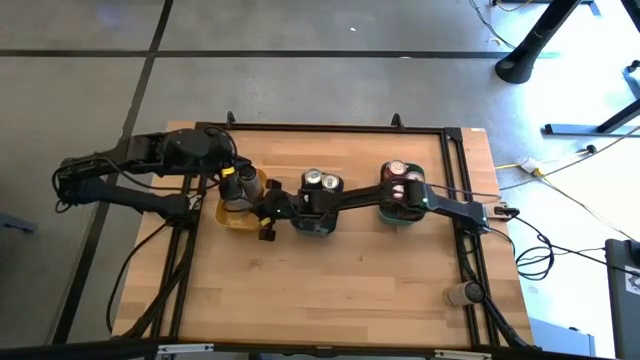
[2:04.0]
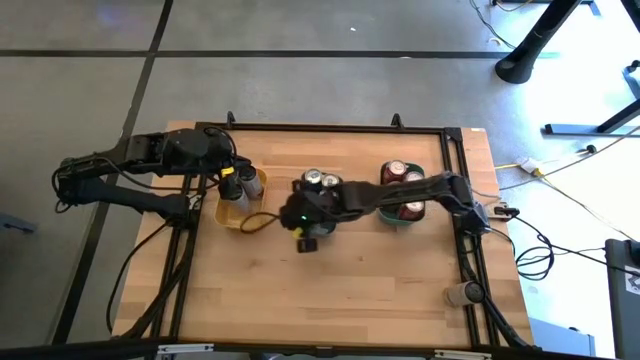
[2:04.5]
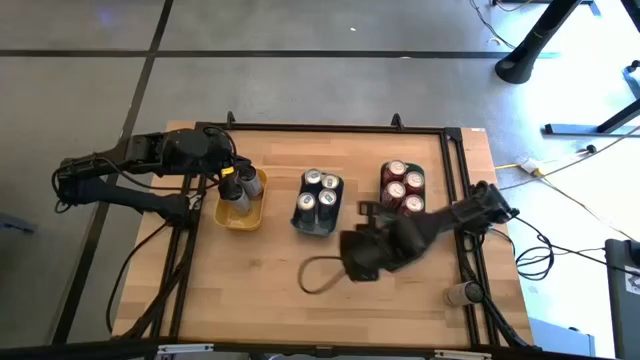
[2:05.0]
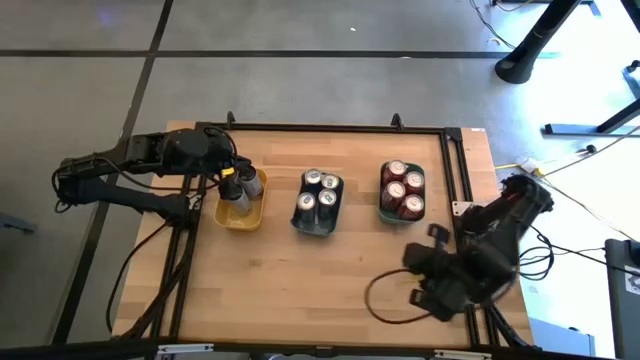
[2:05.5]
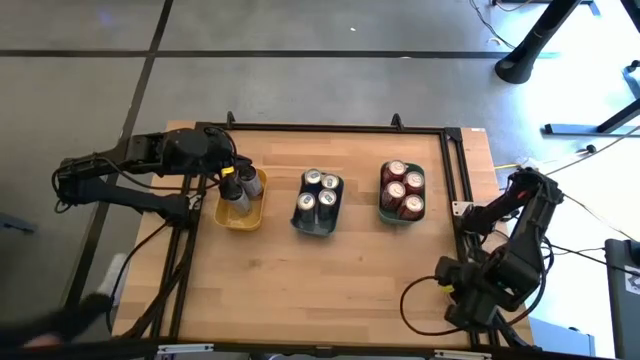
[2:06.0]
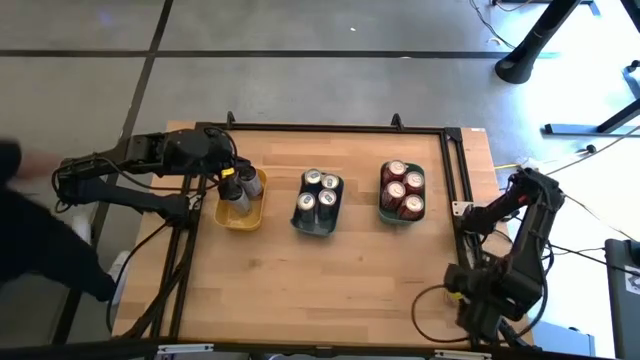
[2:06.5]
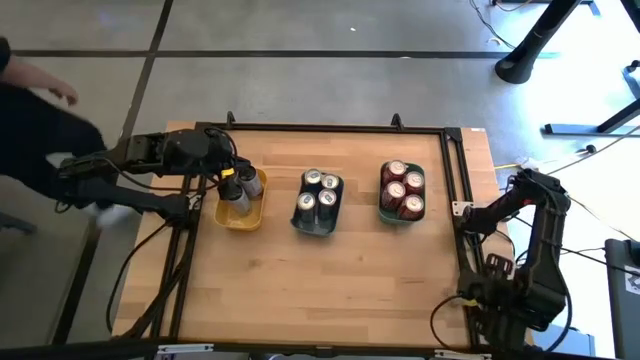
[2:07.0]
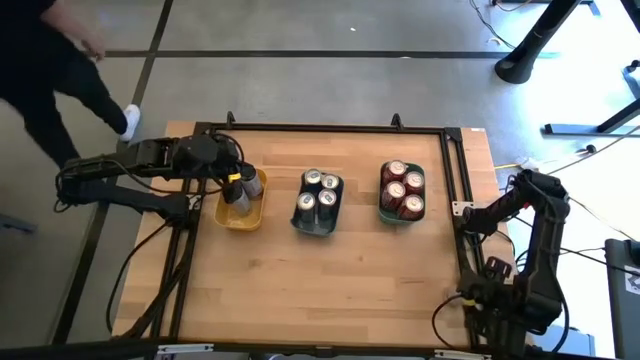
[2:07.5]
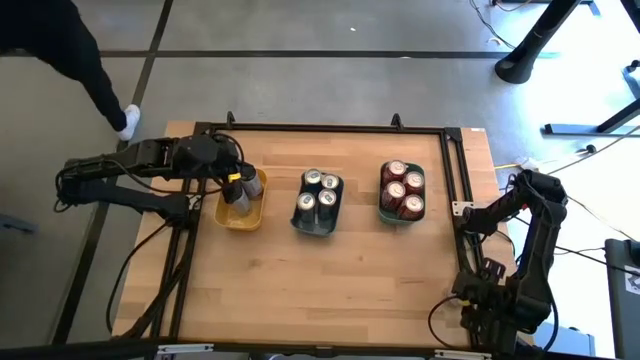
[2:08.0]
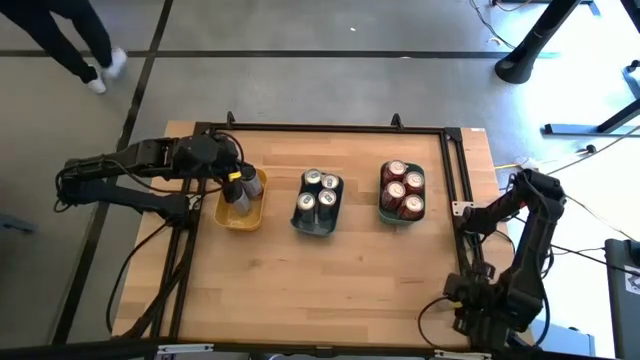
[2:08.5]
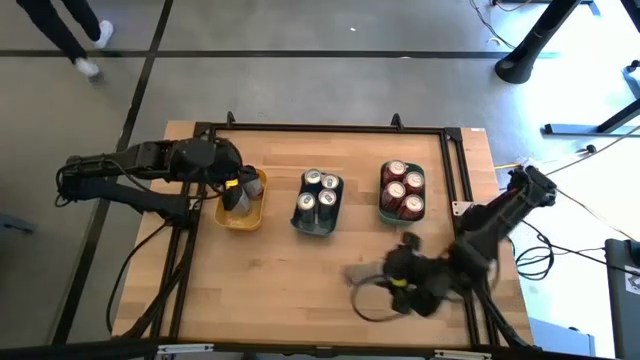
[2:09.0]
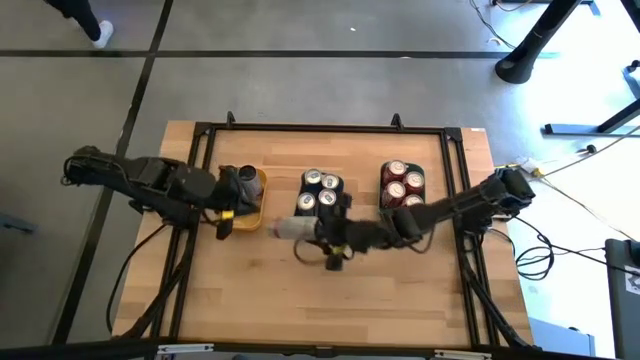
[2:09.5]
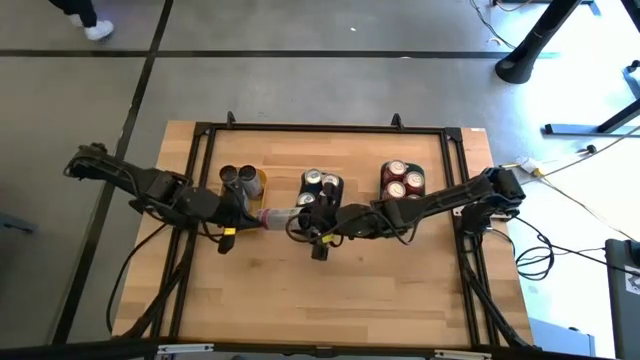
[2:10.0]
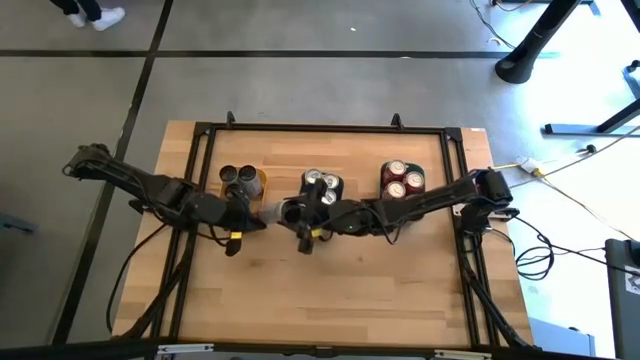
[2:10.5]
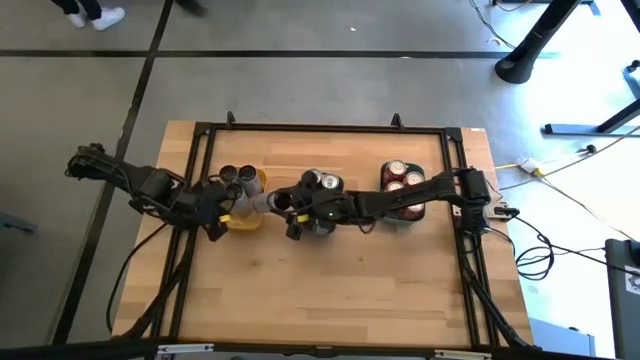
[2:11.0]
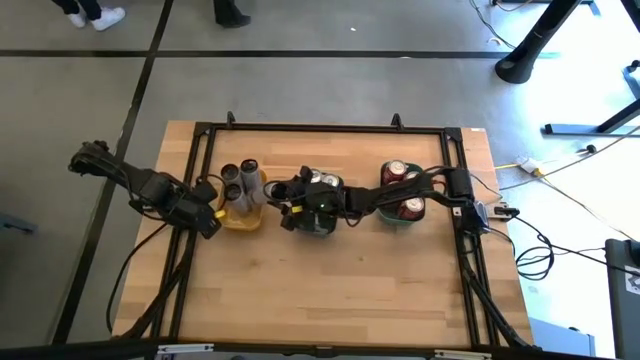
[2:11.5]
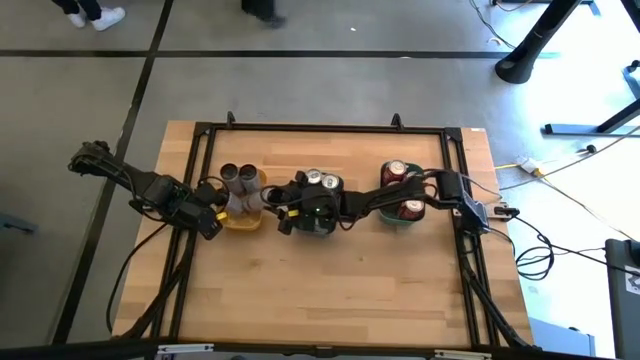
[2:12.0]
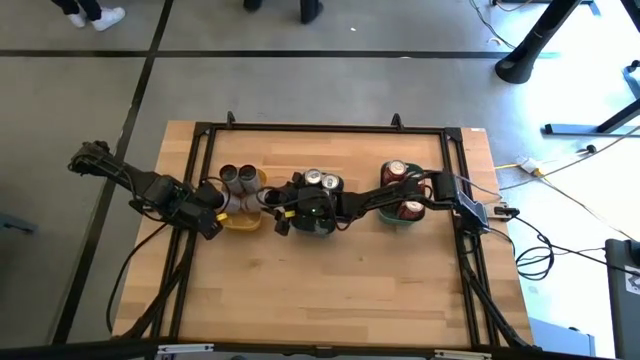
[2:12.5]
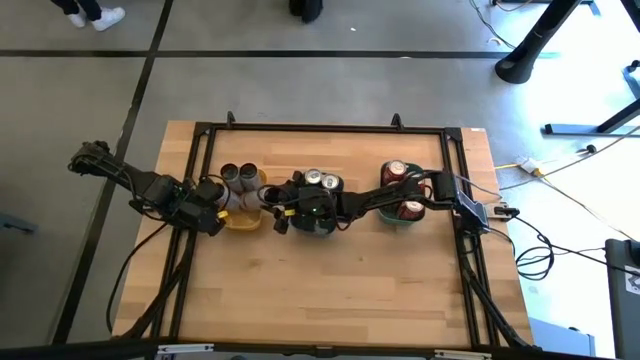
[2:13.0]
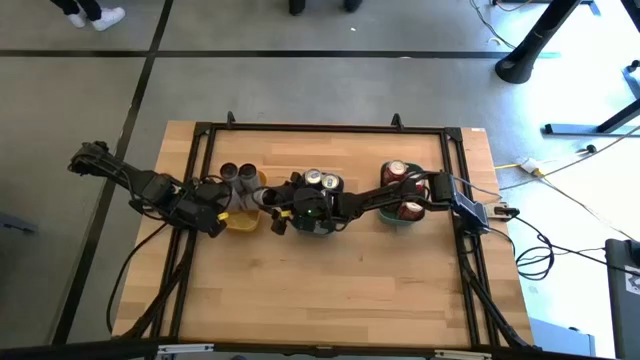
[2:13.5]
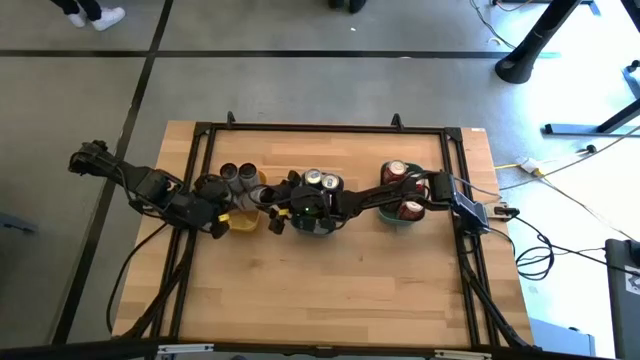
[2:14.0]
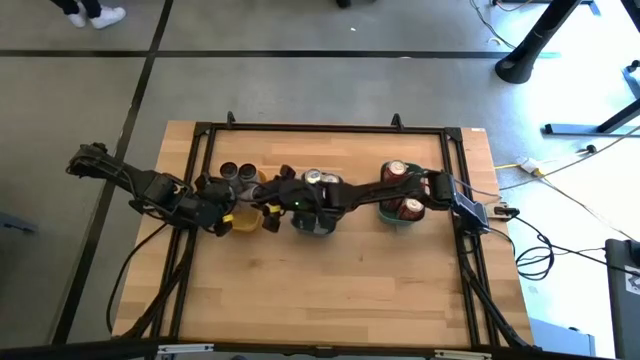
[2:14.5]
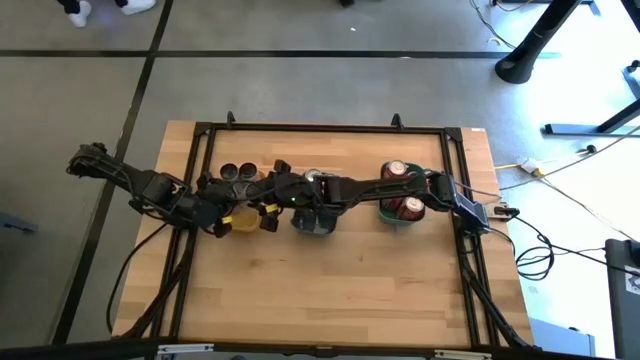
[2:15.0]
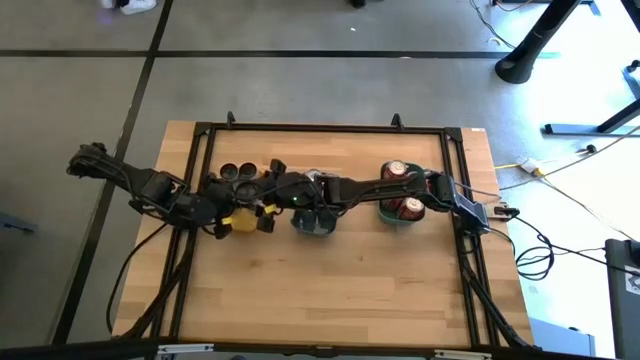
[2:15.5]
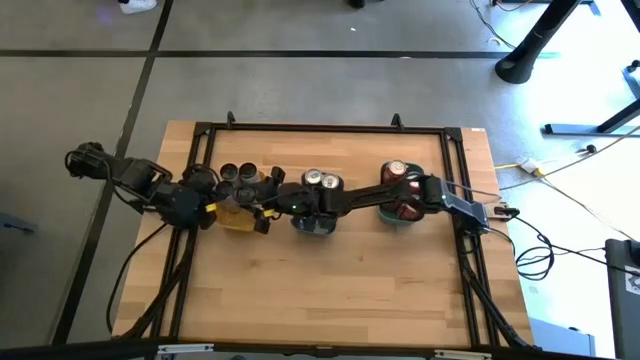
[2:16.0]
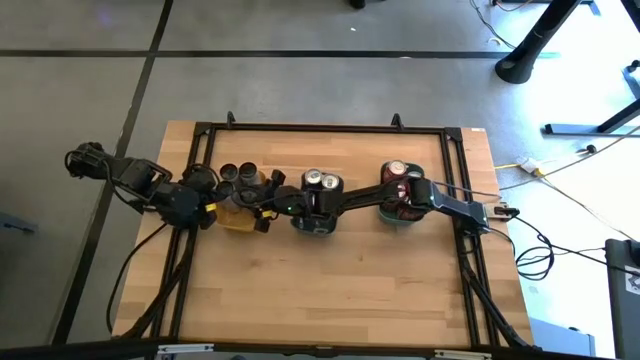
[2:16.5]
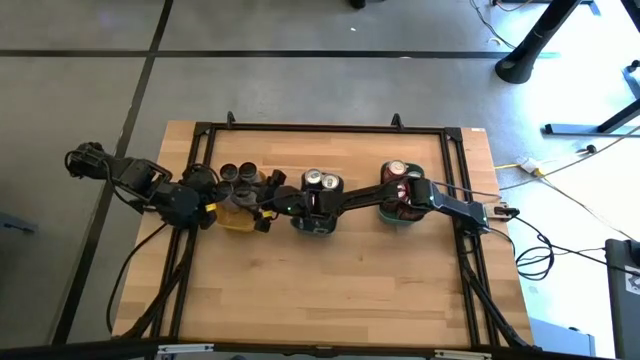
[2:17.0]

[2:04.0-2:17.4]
Task: Sort soda cans
Put the white pink soda can into yellow bin

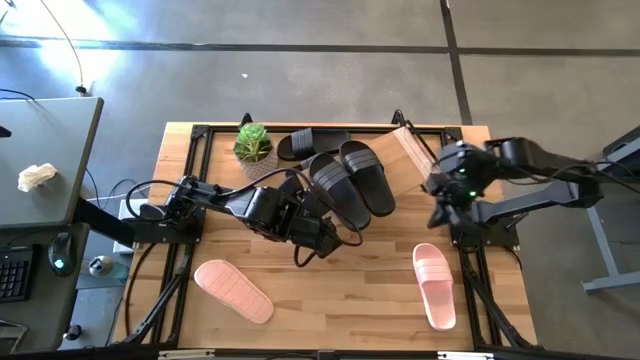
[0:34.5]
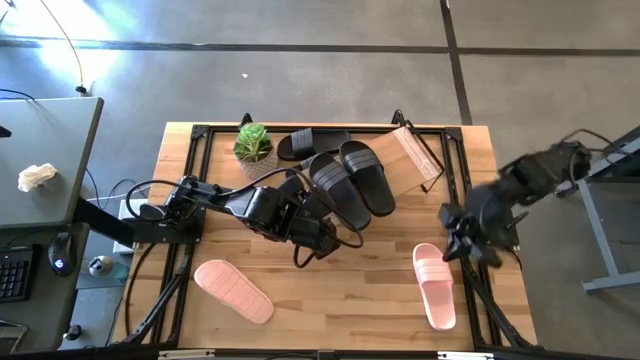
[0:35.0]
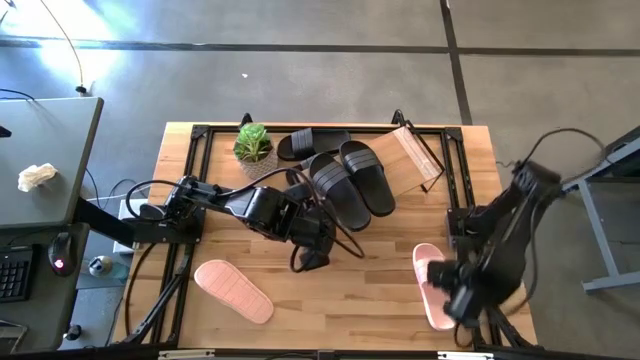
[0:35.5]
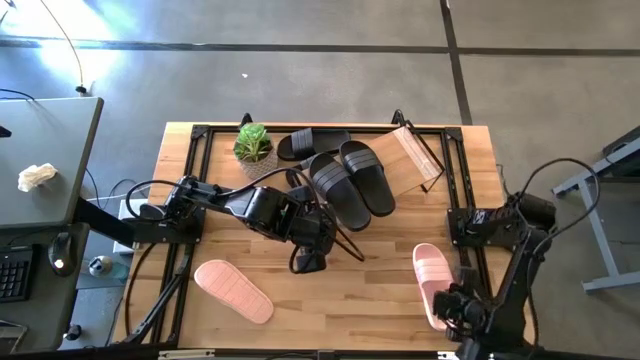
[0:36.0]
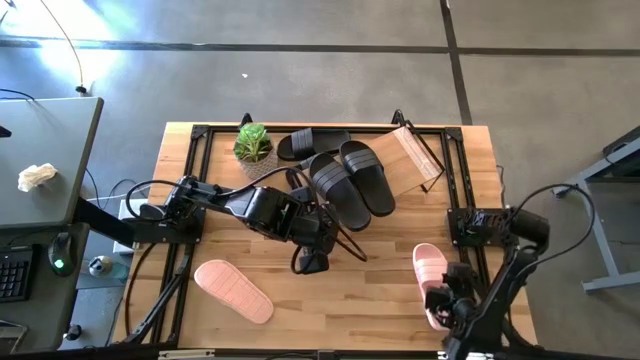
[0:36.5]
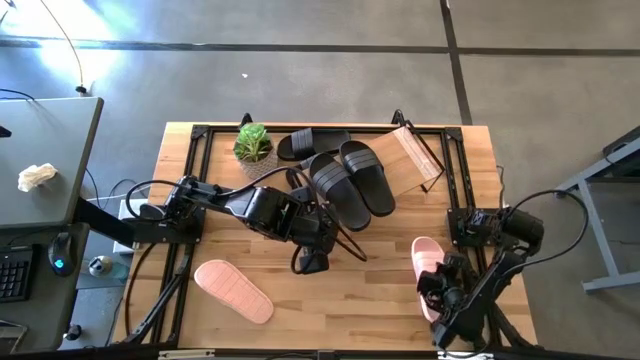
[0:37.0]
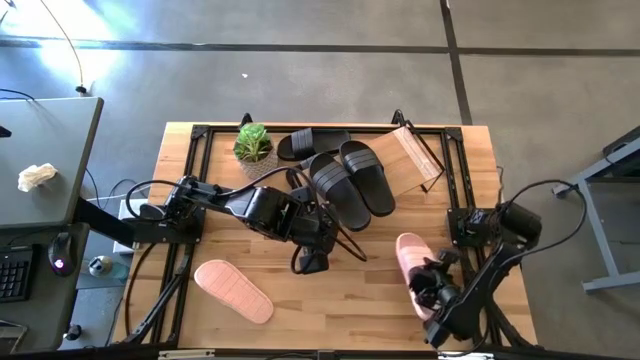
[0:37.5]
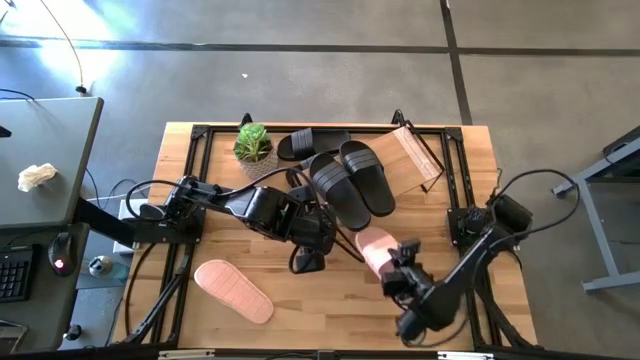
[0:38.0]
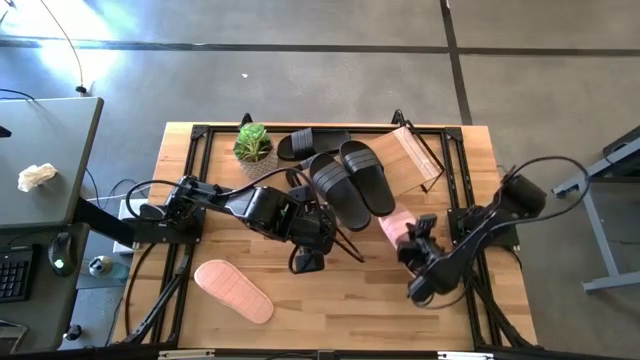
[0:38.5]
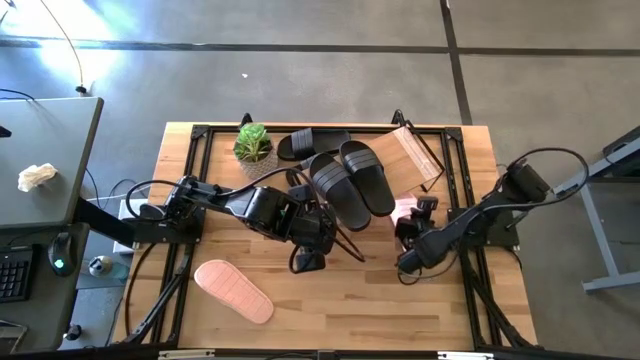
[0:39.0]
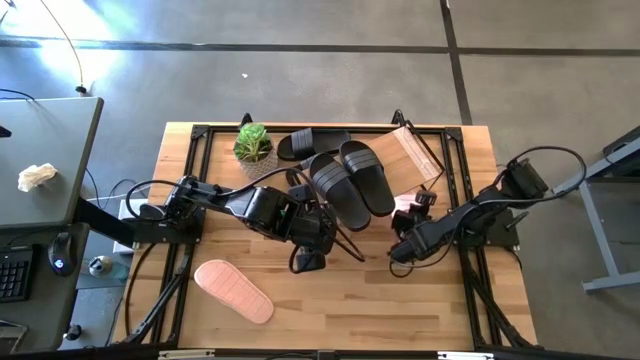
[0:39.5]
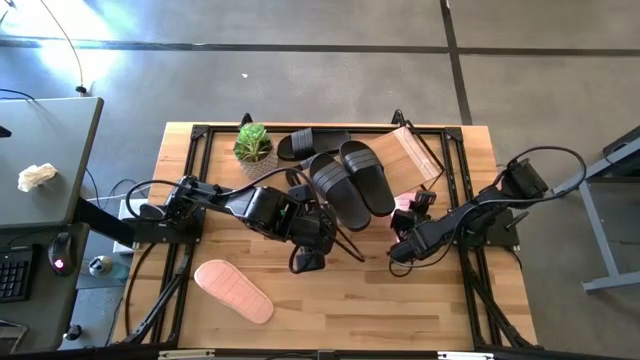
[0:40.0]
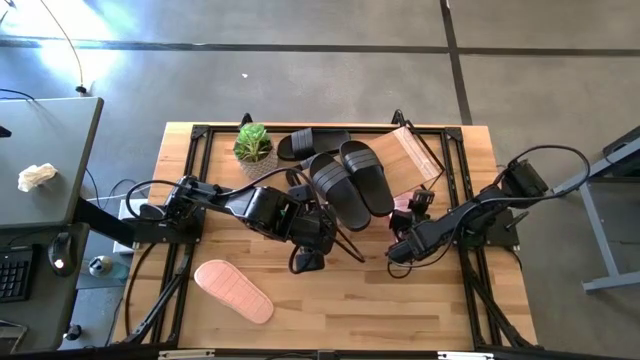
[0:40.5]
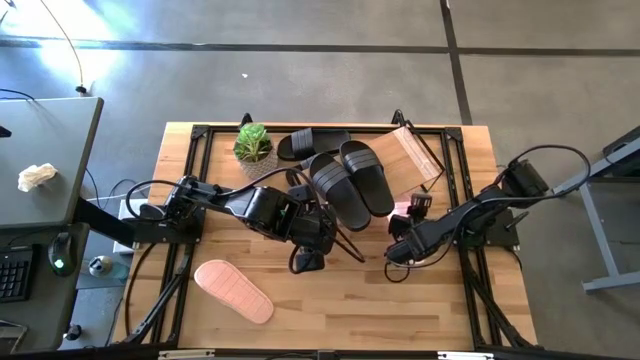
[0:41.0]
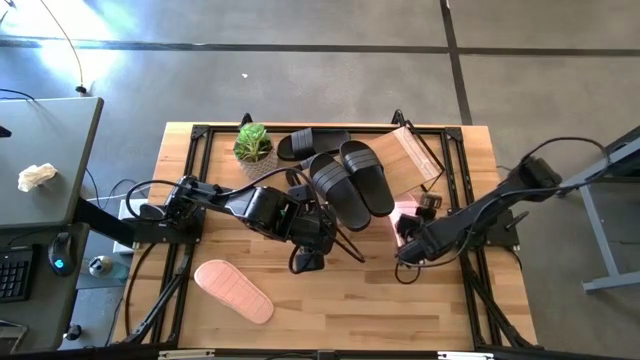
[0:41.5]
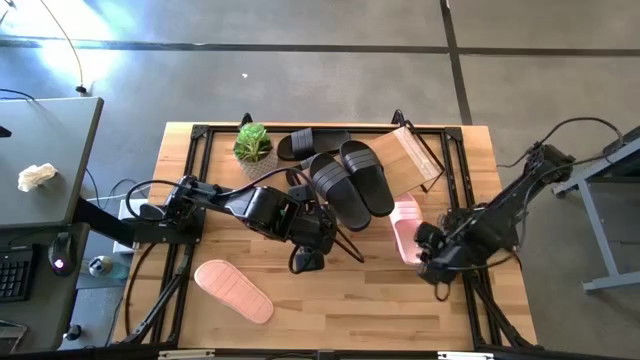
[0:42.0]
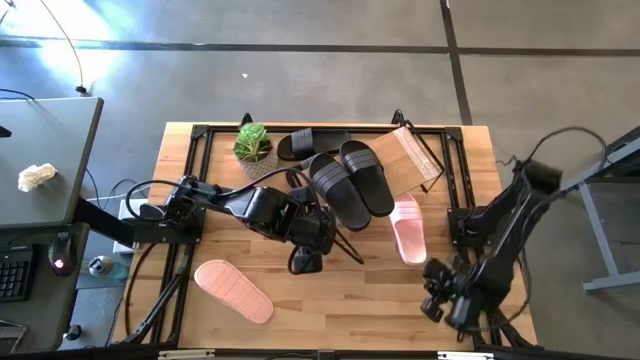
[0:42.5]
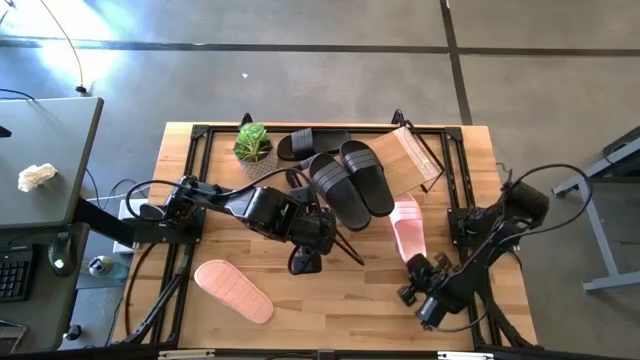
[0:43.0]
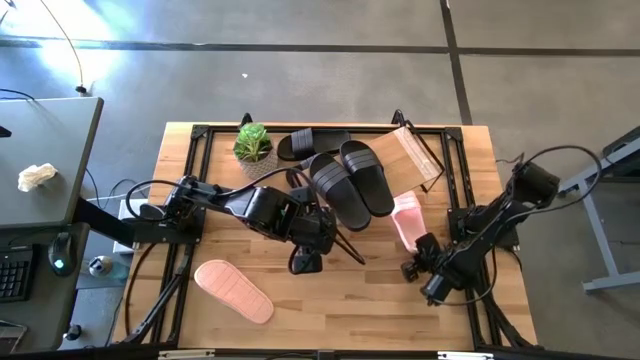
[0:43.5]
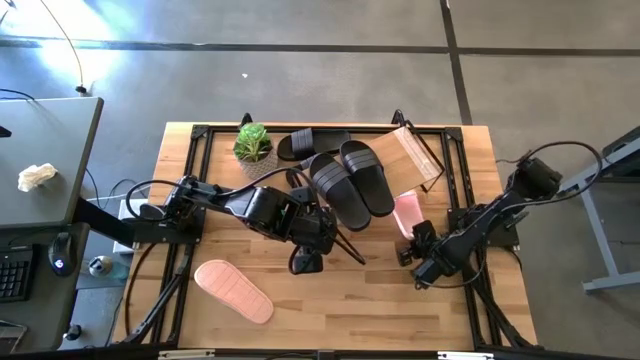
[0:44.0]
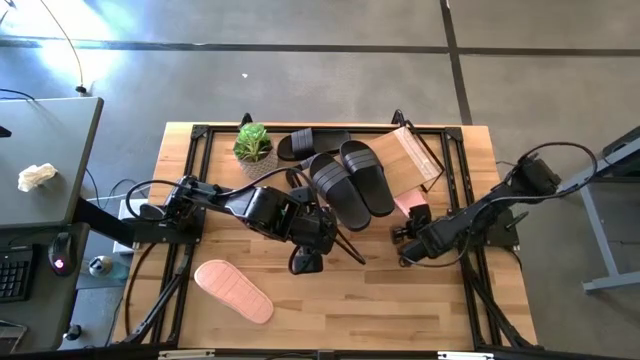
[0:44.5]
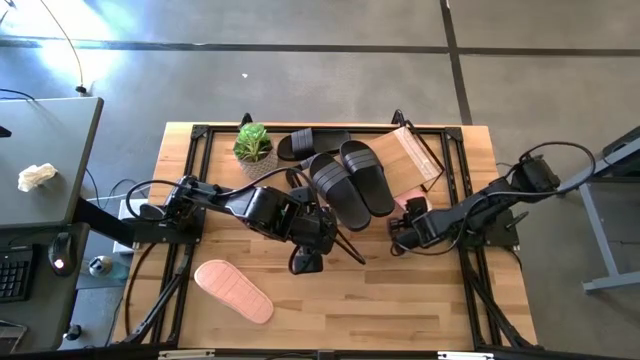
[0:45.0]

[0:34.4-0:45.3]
Task: Pick and place slides into the shelf
Put the right pink slipper under the shelf
